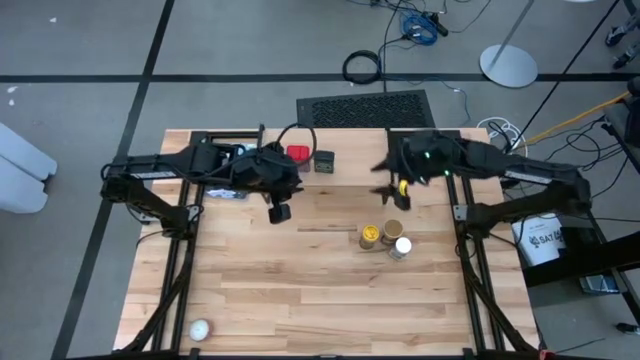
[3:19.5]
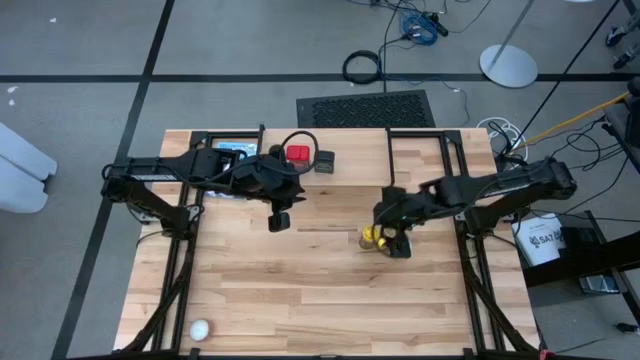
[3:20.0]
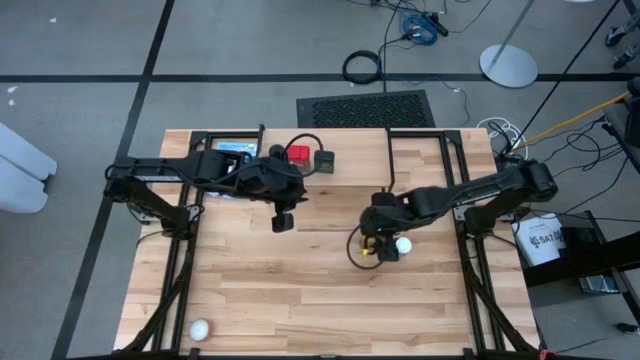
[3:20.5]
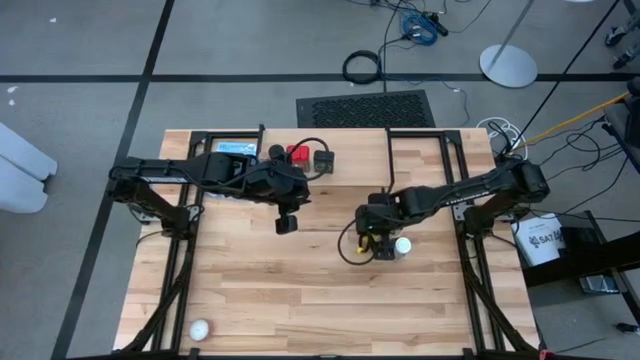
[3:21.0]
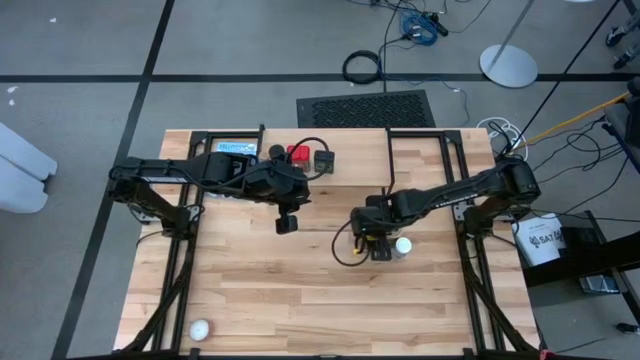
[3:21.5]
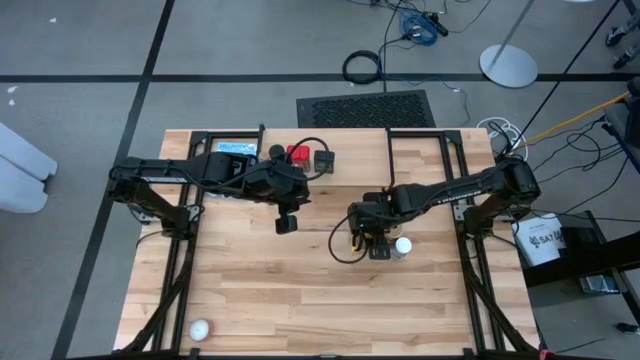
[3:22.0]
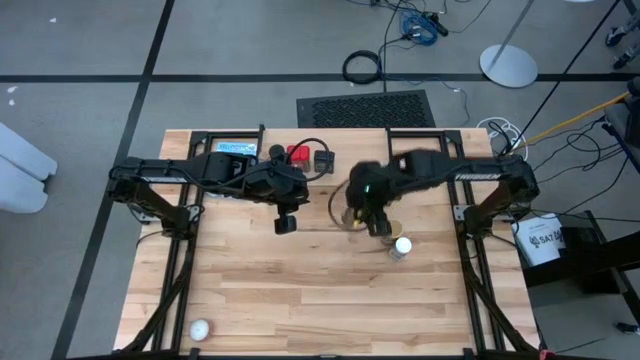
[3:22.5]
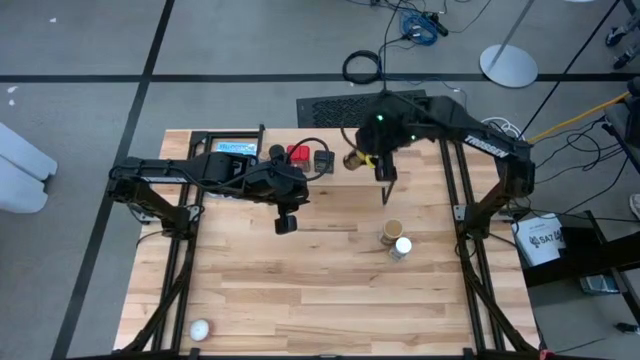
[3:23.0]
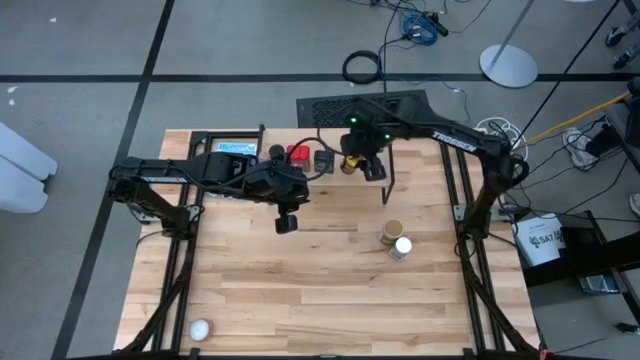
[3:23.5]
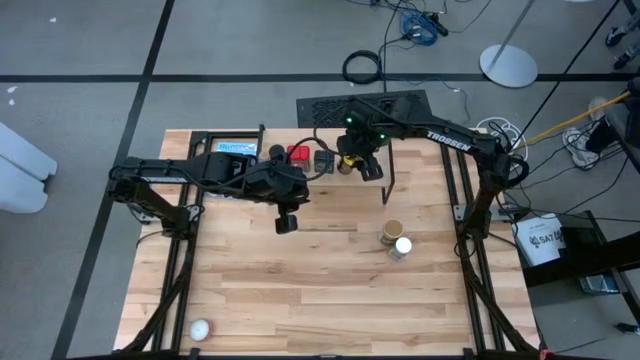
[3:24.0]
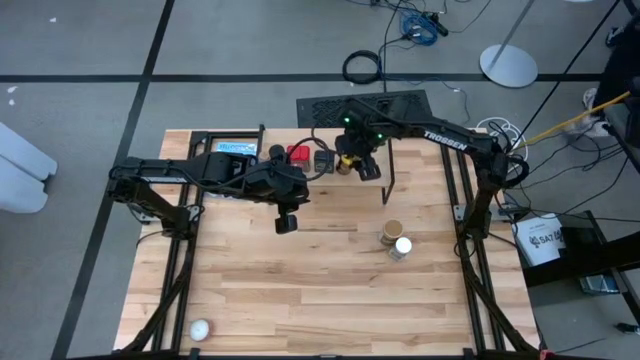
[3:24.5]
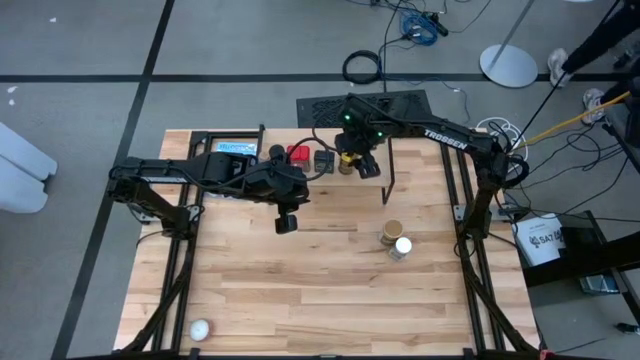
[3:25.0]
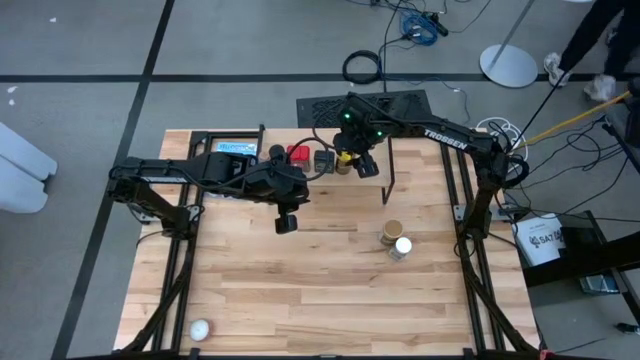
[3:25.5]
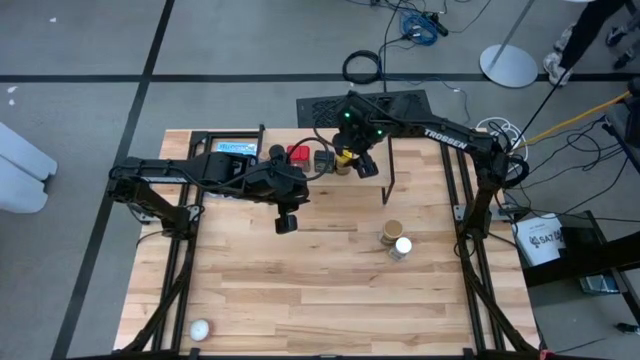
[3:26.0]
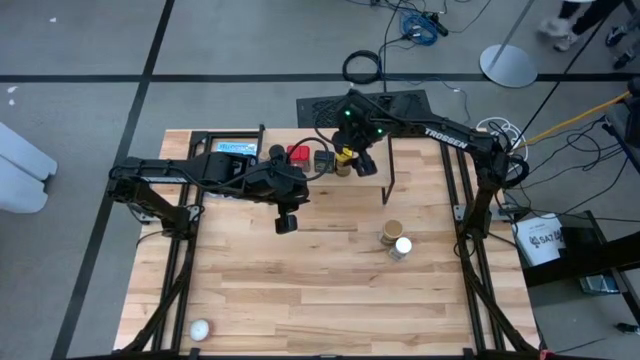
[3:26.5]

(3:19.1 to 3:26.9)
Task: Shelf spices
Put the yellow seasoning bottle on the shelf

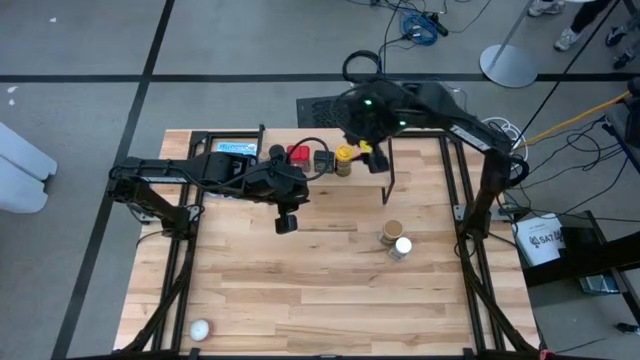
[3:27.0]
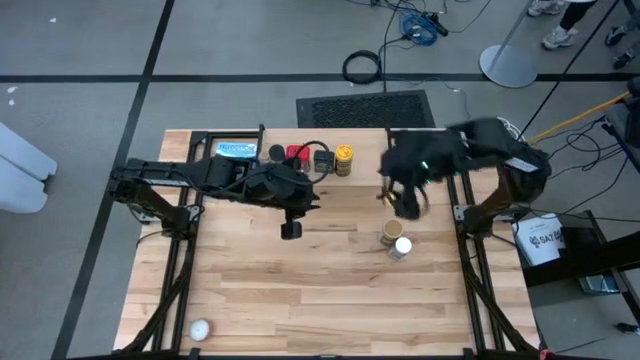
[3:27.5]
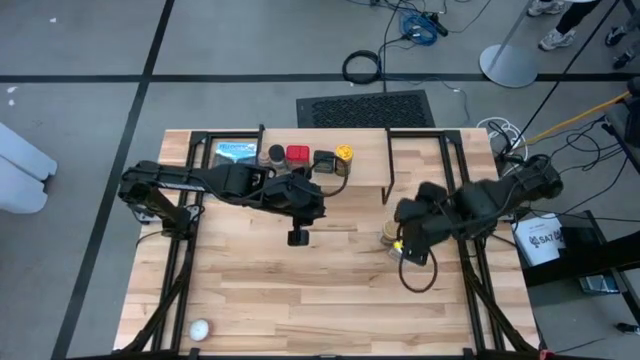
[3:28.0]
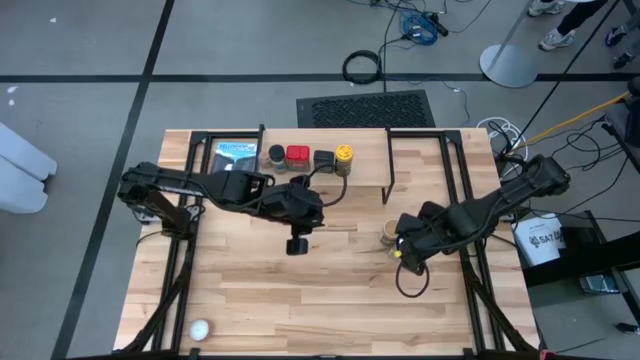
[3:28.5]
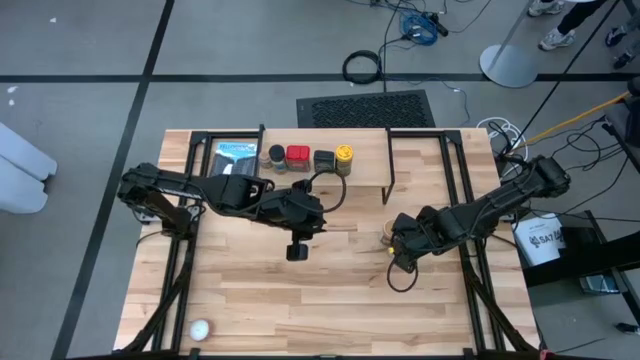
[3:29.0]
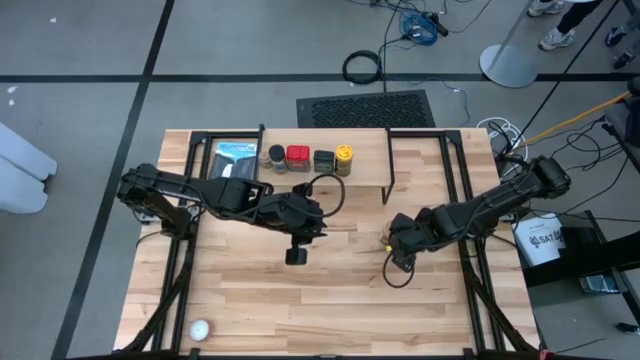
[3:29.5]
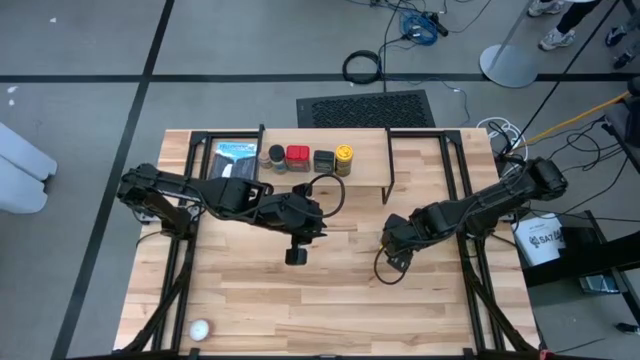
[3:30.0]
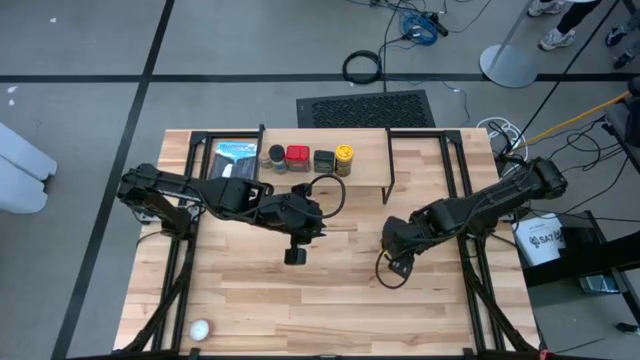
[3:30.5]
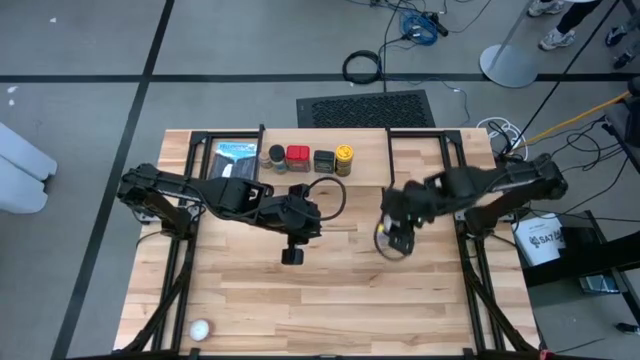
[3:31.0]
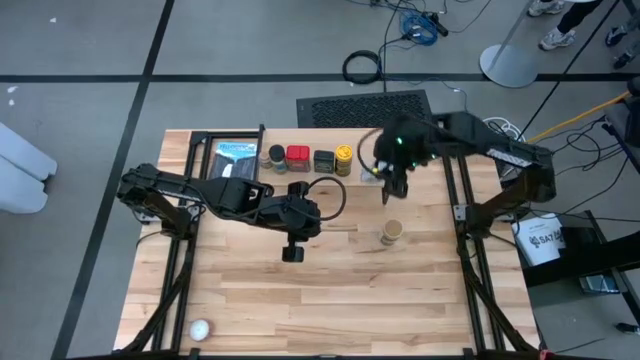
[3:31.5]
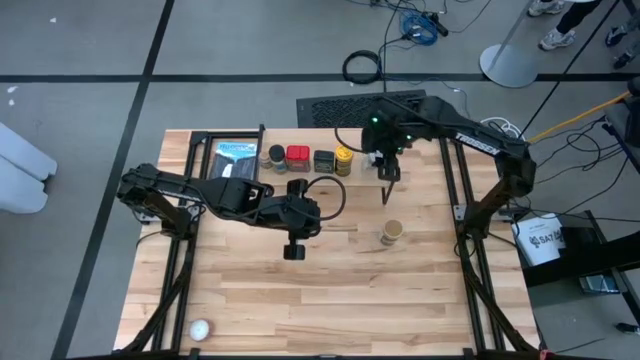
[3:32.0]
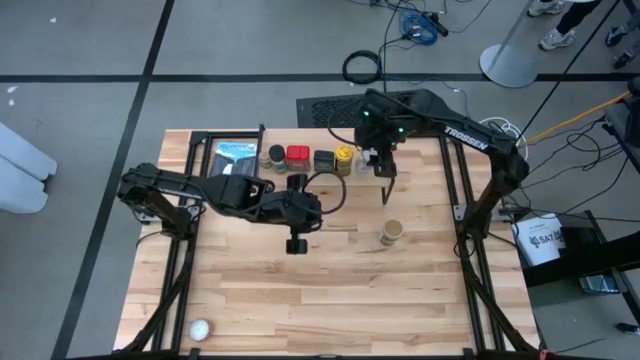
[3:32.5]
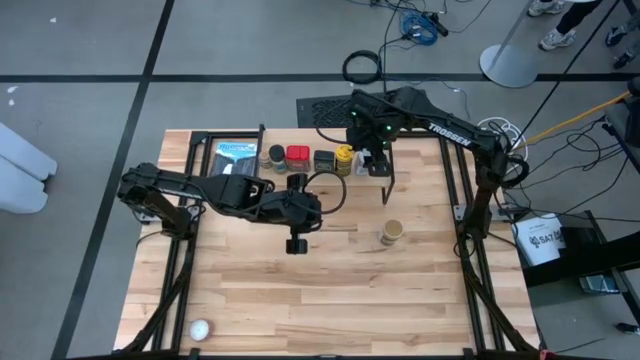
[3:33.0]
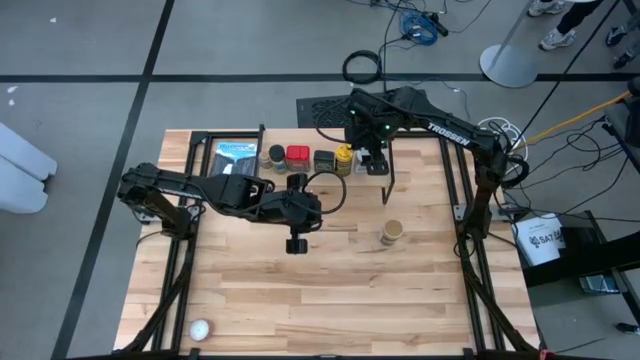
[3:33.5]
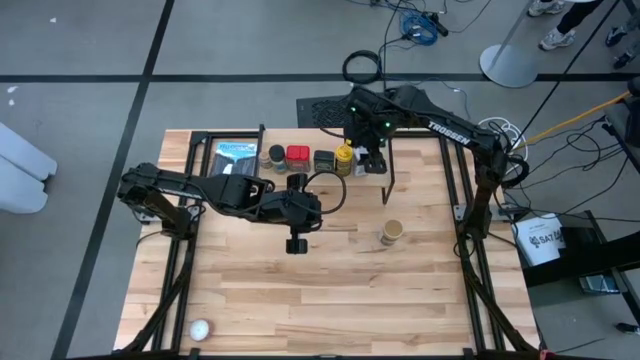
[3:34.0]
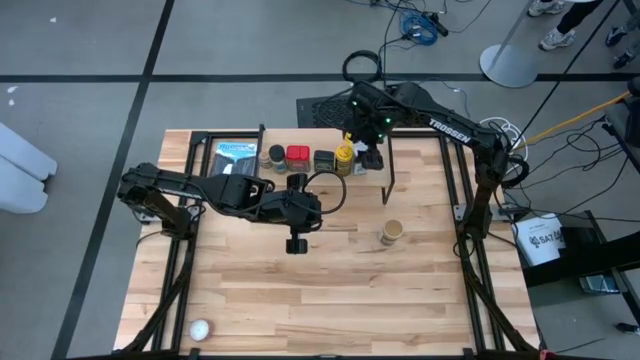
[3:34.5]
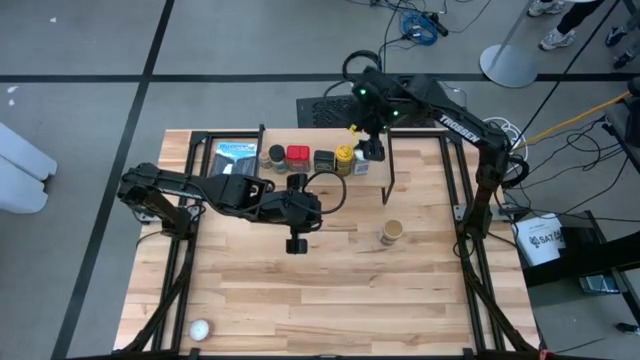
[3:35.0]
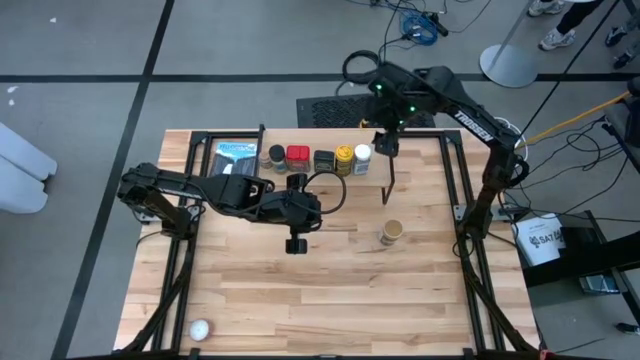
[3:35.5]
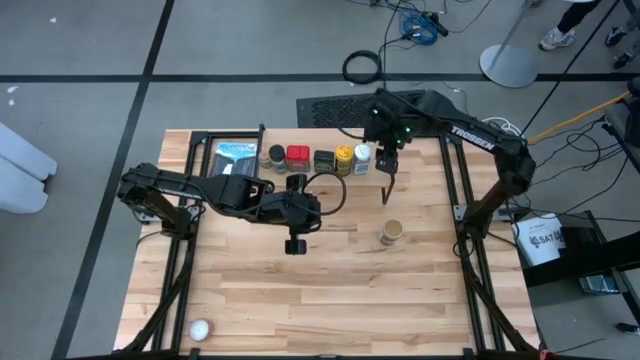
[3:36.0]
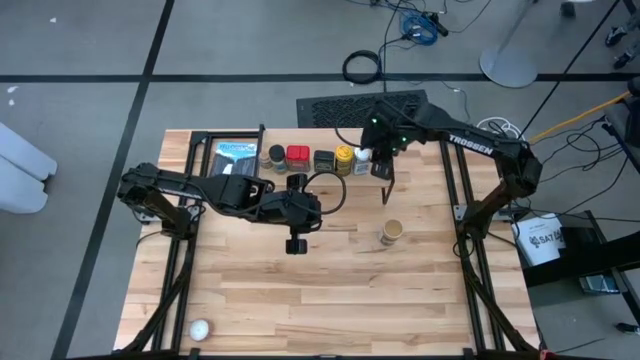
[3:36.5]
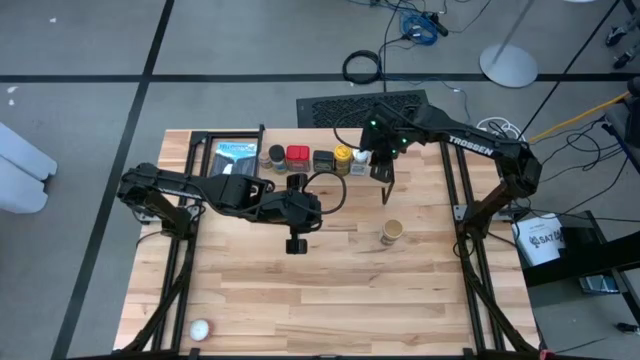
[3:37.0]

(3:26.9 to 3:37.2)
Put the white seasoning bottle on the shelf

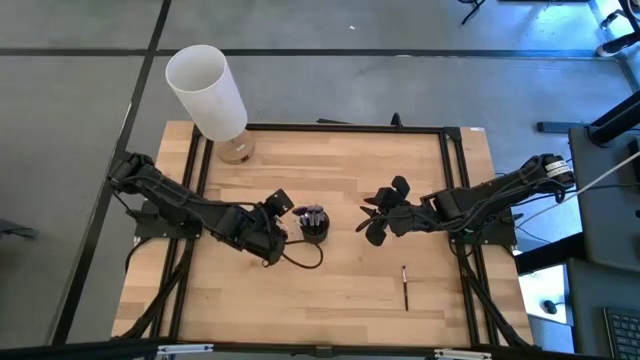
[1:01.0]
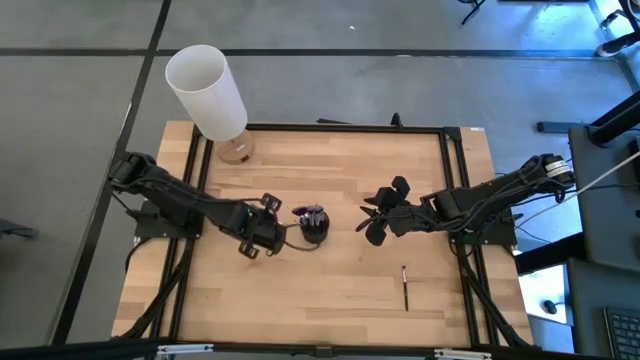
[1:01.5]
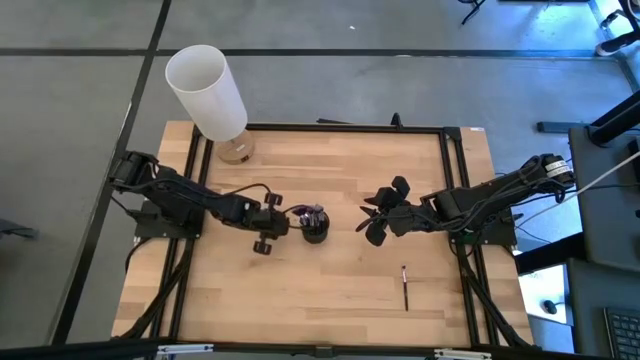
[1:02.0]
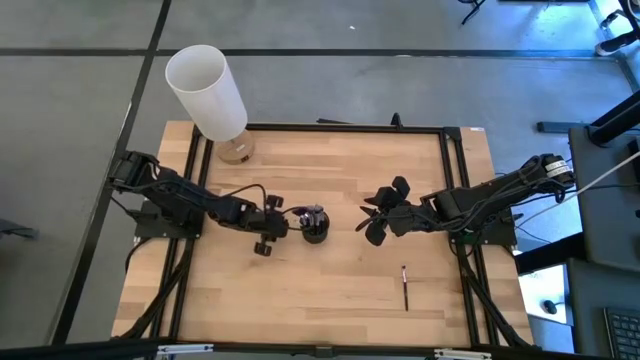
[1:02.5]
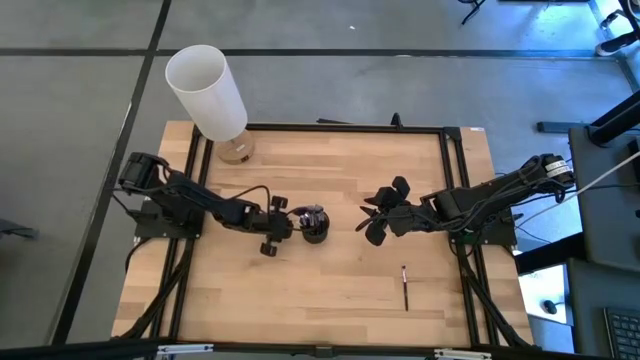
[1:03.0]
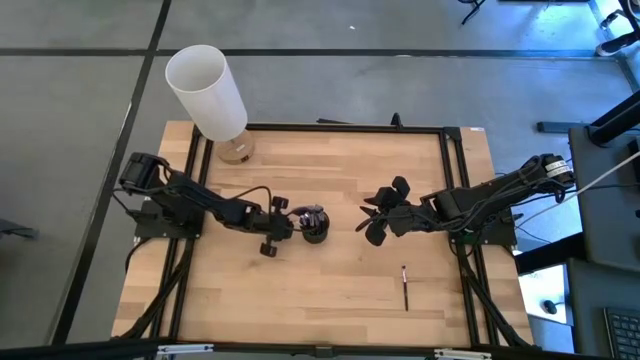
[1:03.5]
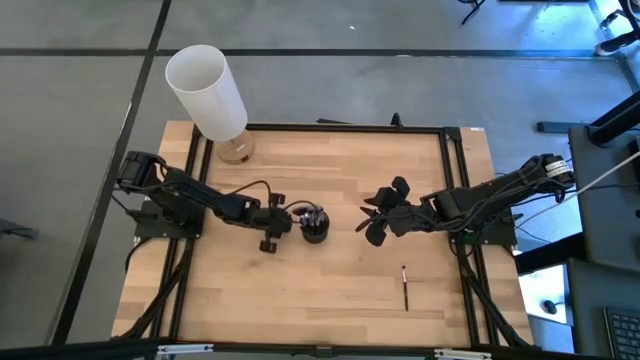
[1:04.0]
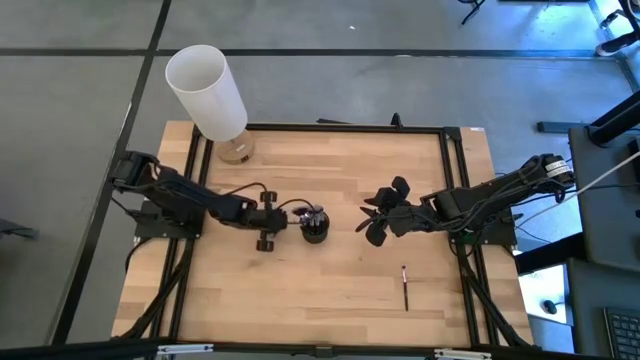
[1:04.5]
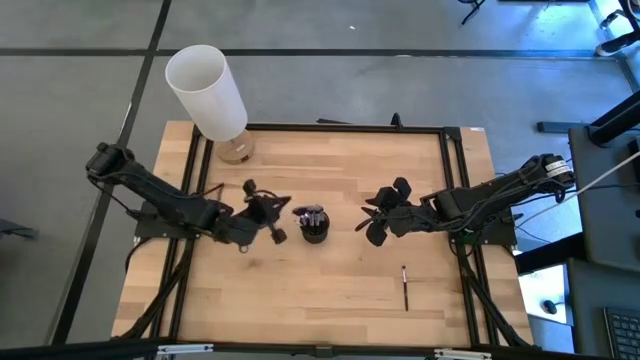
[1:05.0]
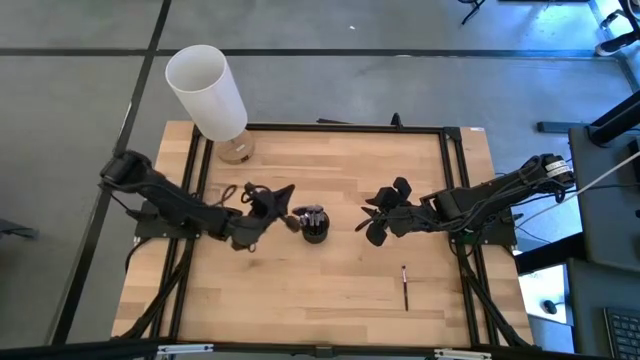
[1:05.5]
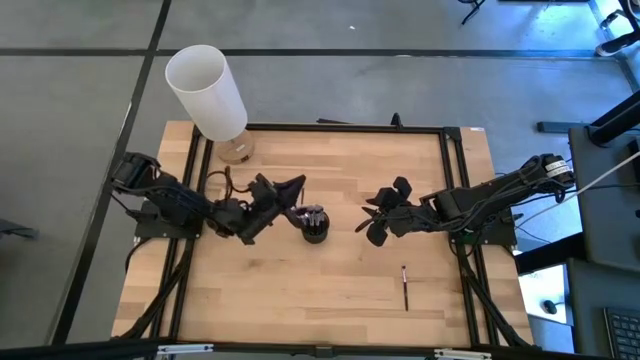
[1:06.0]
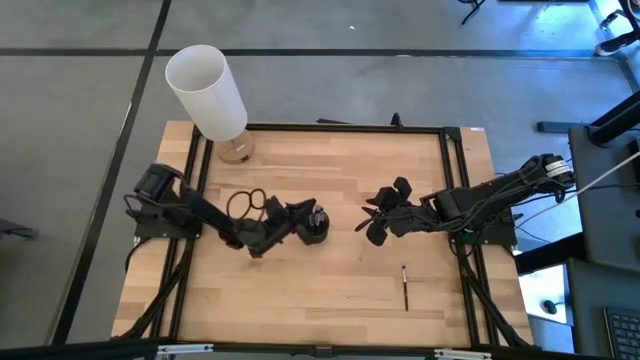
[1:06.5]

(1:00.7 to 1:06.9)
Task: Sort items
Put the silver eyeshadow brush into the pen holder
